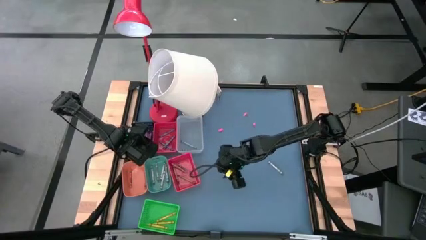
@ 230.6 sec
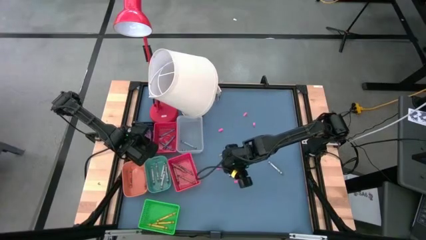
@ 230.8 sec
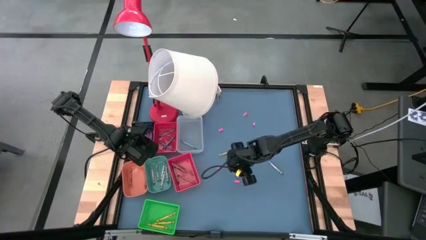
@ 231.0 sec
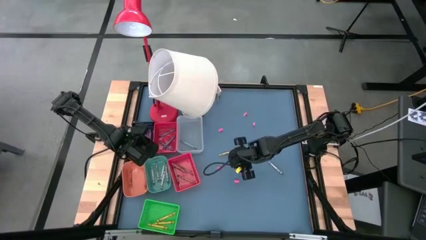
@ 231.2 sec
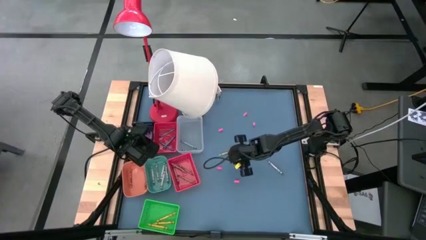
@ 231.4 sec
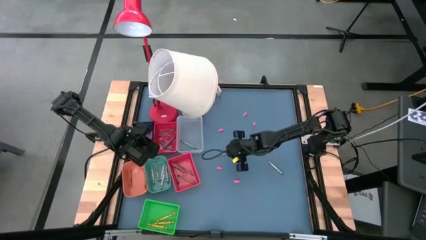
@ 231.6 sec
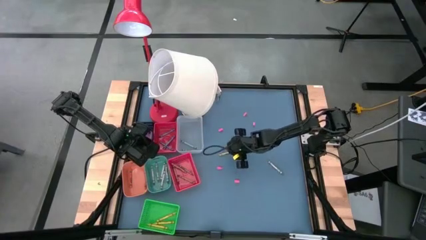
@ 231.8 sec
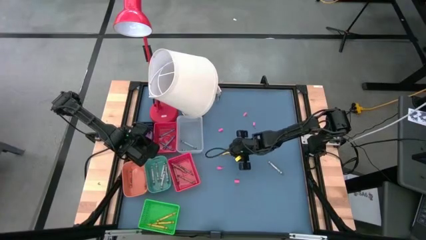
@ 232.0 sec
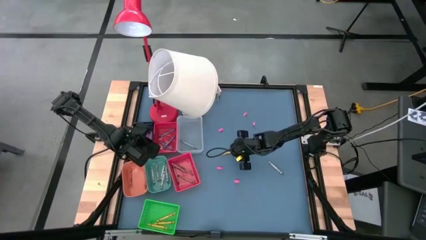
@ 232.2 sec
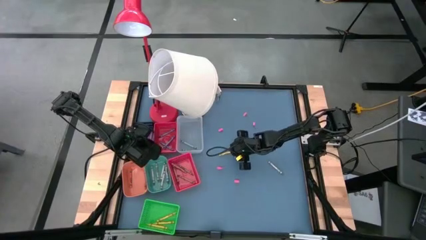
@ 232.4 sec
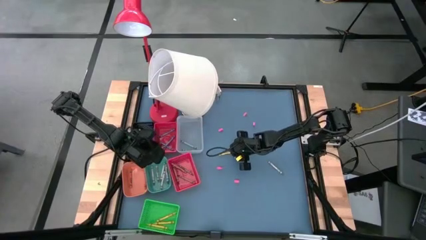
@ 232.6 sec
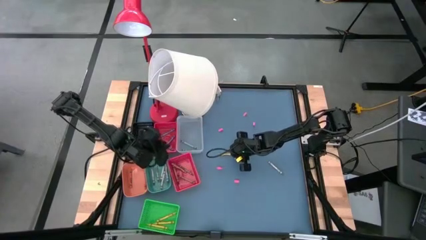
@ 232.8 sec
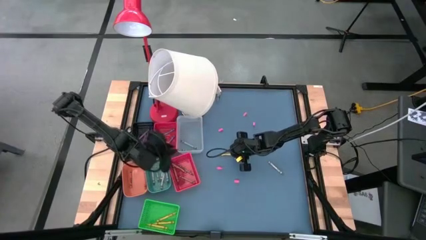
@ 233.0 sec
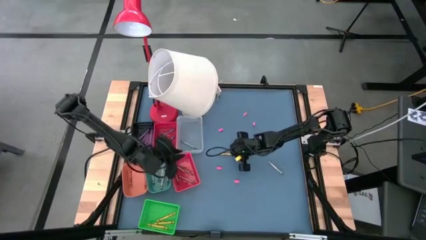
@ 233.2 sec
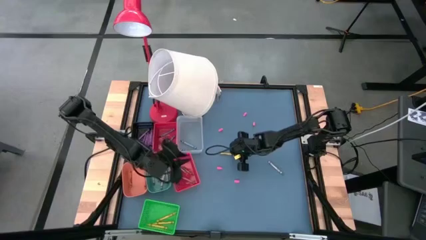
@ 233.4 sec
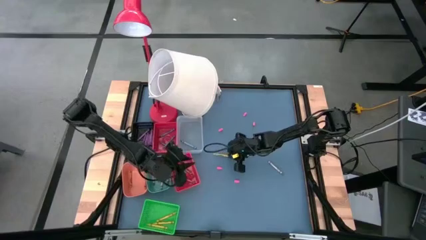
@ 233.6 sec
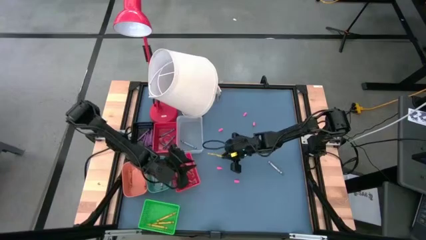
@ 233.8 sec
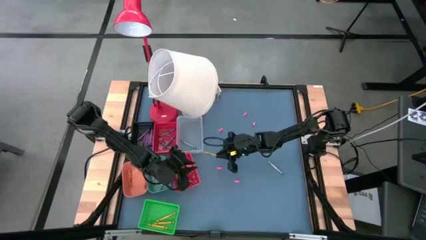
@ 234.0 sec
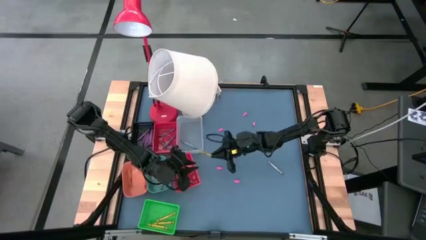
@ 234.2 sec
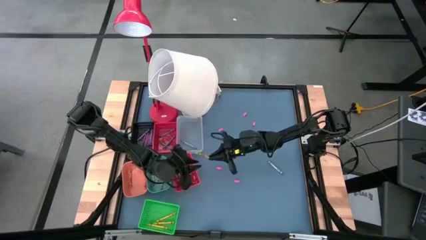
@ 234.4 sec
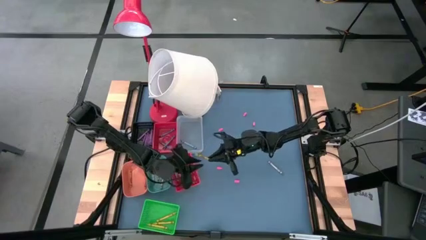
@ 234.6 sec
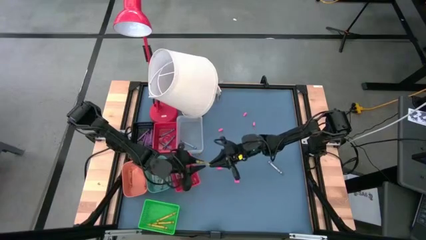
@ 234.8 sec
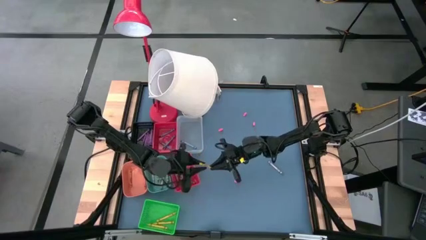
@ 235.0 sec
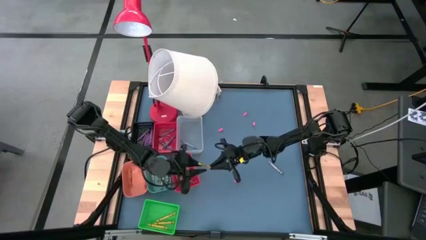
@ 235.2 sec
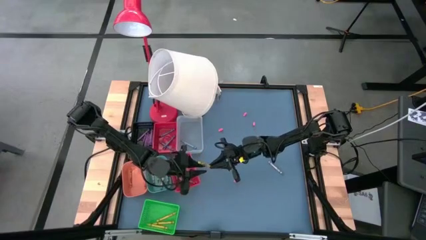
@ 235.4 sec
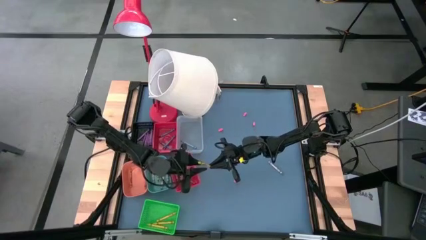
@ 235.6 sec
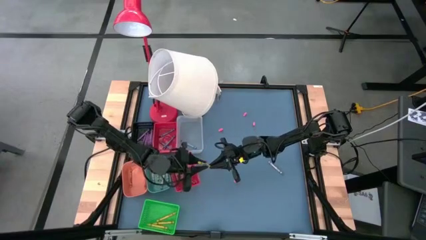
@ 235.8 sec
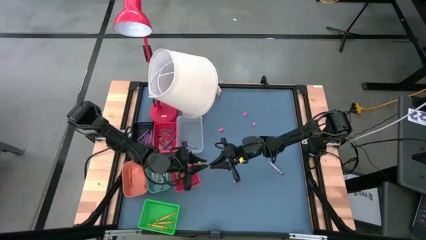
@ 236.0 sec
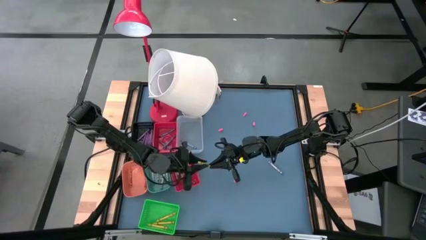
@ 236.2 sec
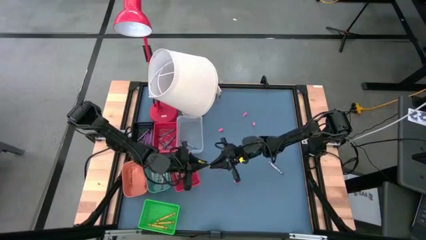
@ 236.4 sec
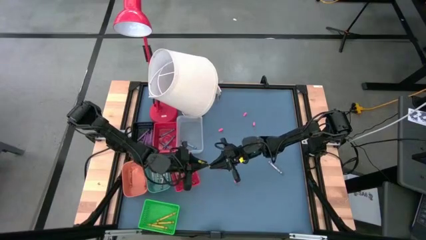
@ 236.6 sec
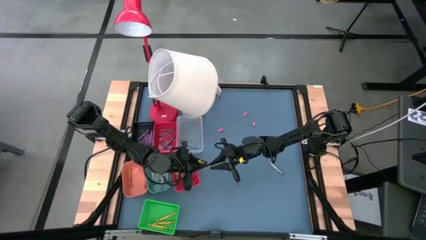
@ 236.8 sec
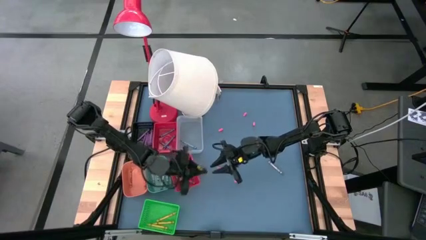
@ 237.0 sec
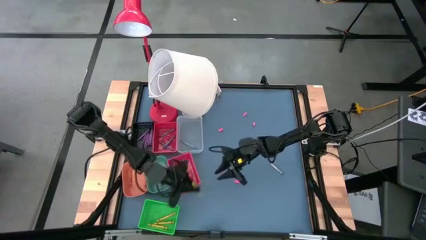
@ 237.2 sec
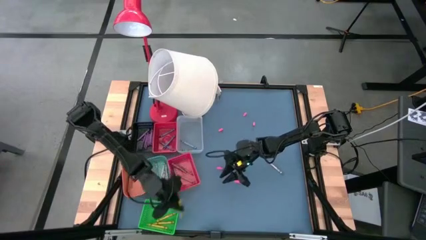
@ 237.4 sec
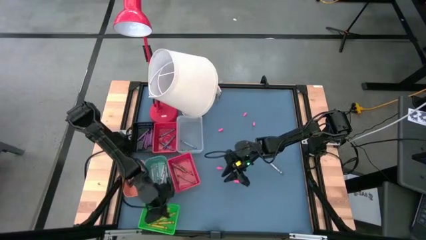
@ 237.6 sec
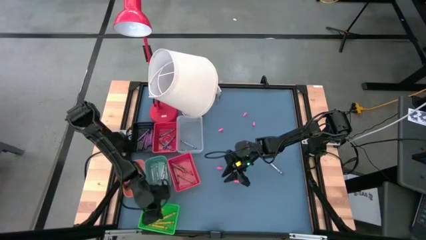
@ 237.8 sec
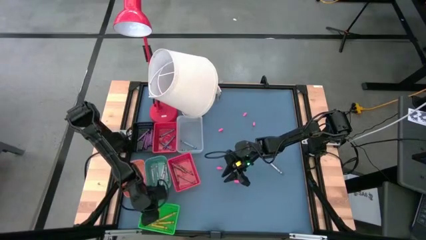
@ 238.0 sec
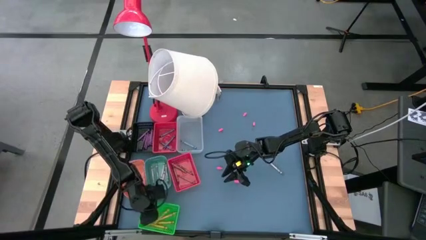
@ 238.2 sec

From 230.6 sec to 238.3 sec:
Task: Sort crayons
Put the yellow crayon into the green bin

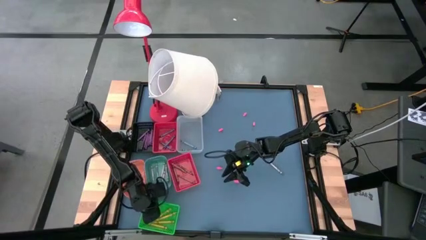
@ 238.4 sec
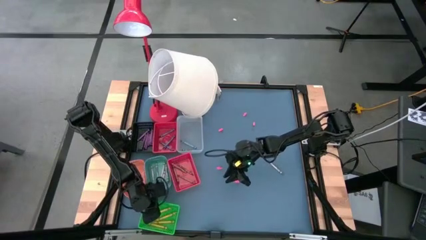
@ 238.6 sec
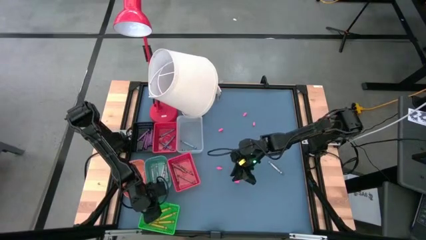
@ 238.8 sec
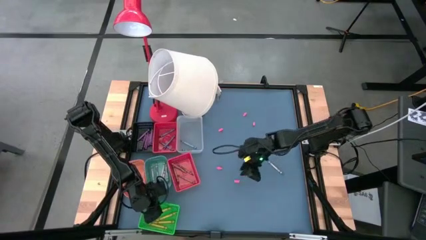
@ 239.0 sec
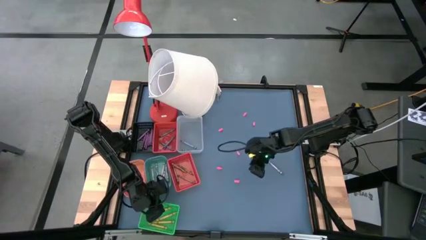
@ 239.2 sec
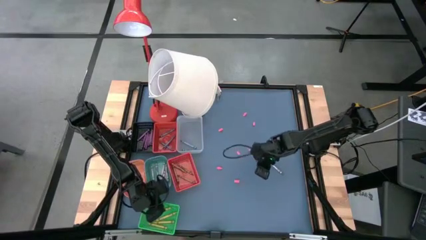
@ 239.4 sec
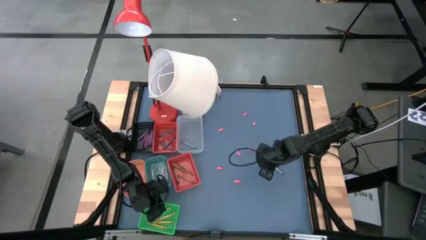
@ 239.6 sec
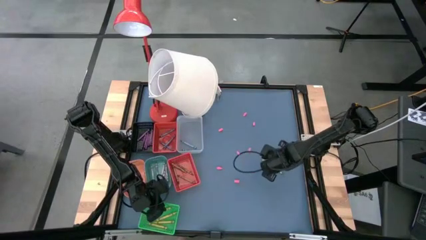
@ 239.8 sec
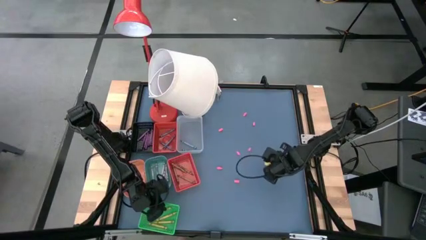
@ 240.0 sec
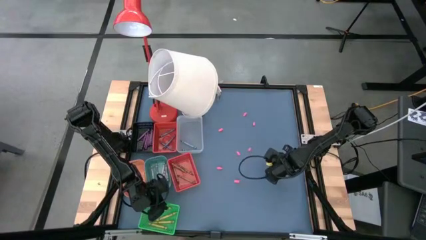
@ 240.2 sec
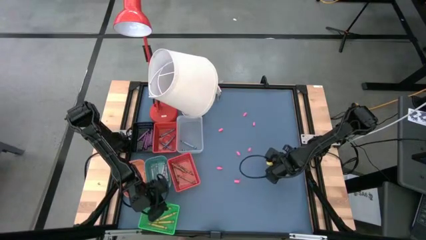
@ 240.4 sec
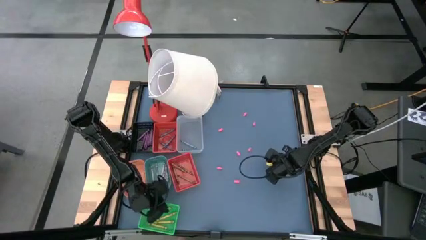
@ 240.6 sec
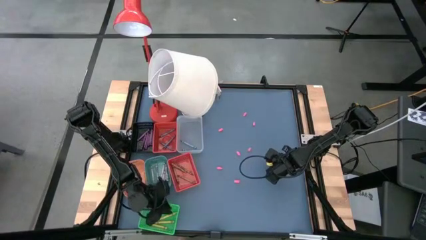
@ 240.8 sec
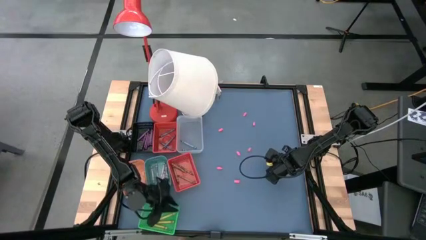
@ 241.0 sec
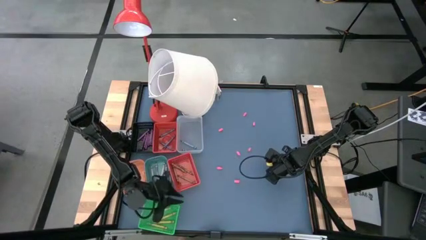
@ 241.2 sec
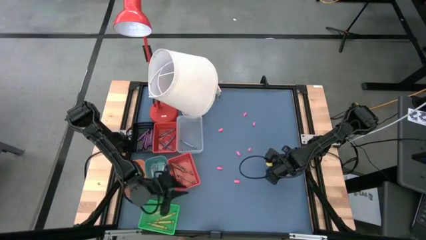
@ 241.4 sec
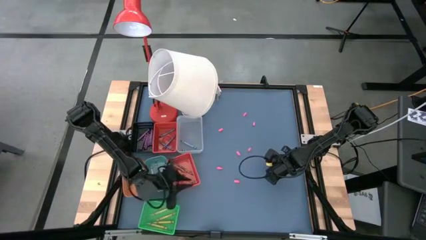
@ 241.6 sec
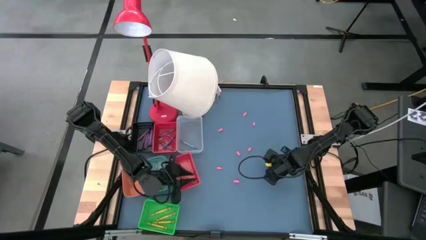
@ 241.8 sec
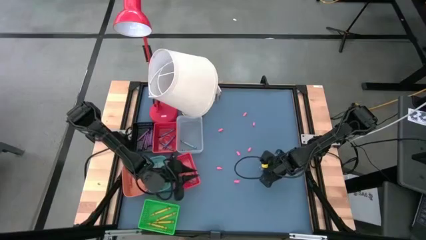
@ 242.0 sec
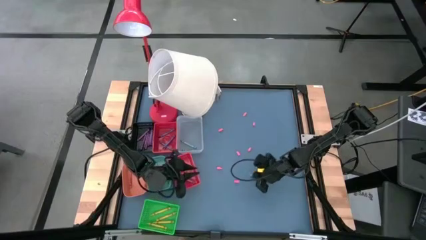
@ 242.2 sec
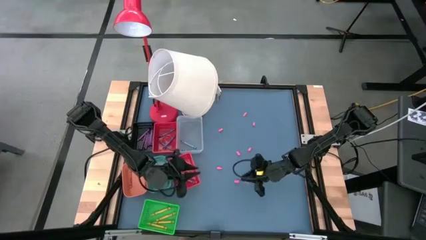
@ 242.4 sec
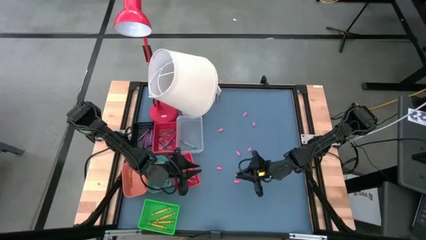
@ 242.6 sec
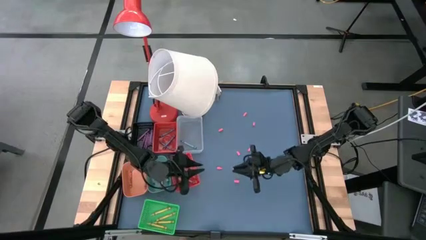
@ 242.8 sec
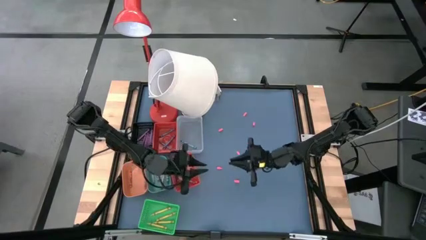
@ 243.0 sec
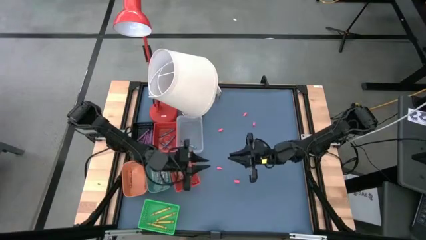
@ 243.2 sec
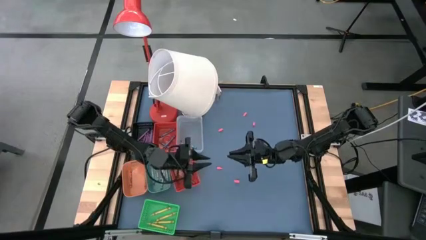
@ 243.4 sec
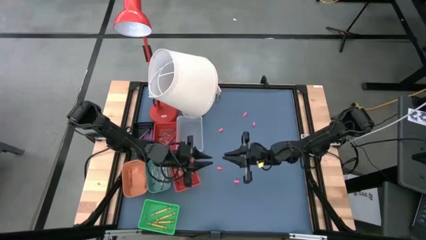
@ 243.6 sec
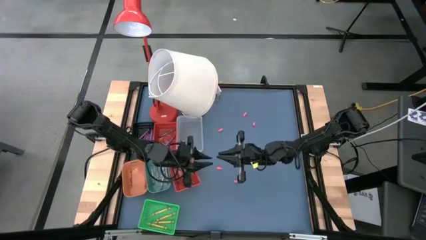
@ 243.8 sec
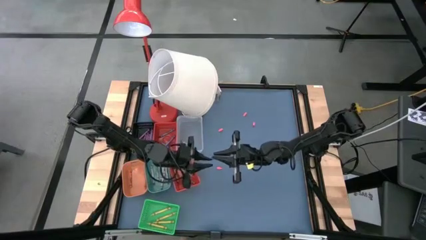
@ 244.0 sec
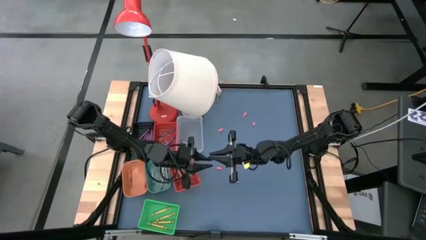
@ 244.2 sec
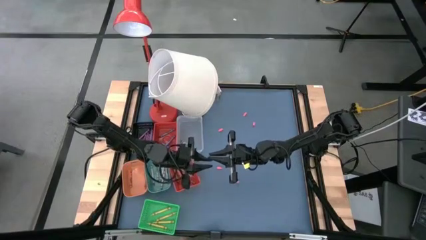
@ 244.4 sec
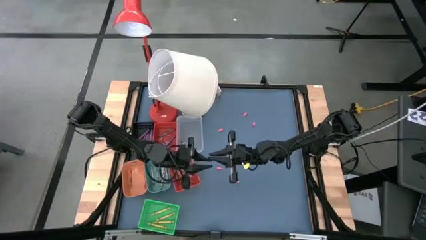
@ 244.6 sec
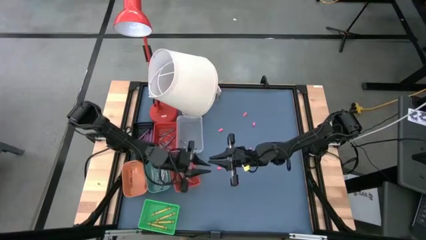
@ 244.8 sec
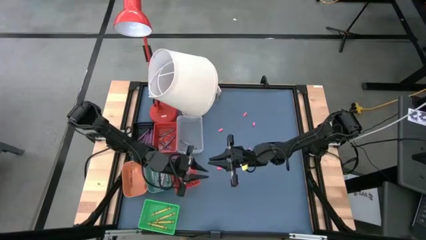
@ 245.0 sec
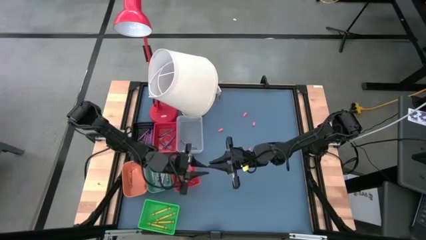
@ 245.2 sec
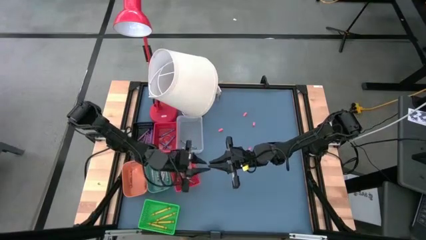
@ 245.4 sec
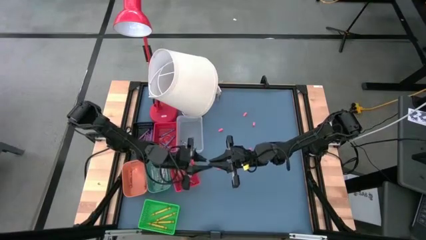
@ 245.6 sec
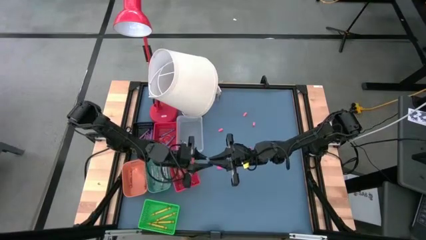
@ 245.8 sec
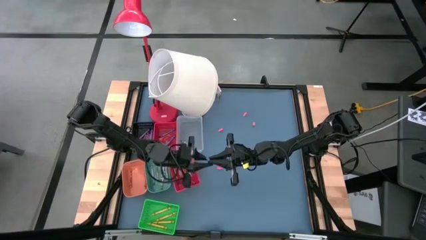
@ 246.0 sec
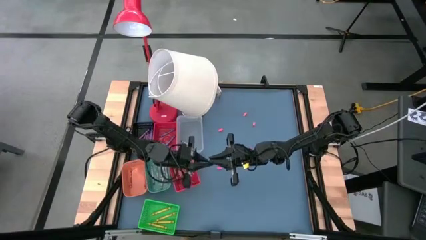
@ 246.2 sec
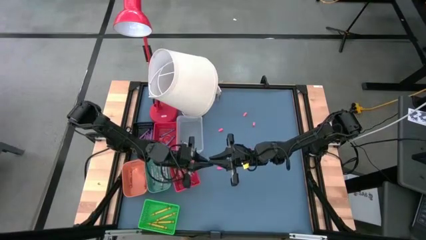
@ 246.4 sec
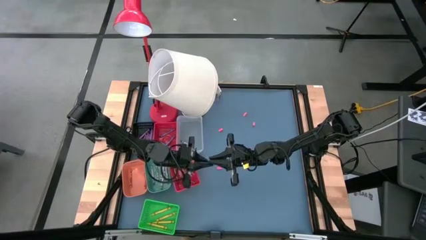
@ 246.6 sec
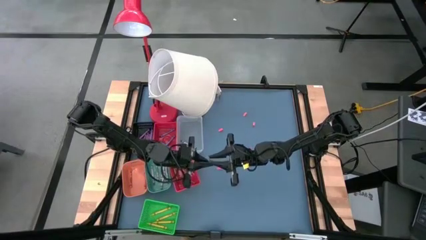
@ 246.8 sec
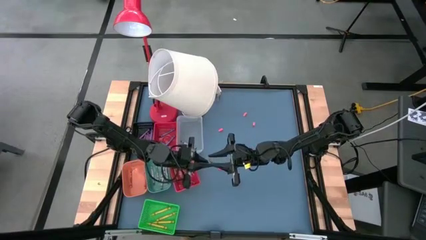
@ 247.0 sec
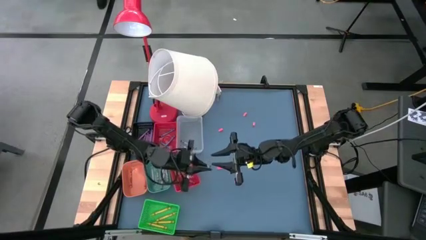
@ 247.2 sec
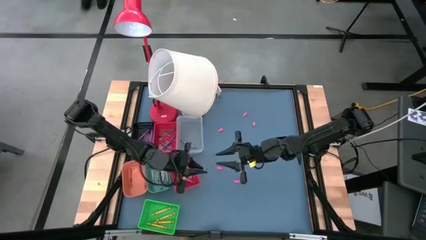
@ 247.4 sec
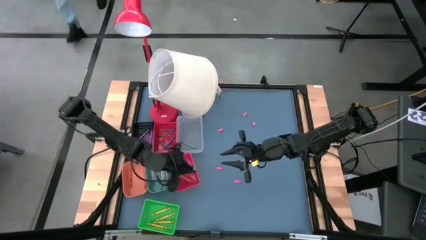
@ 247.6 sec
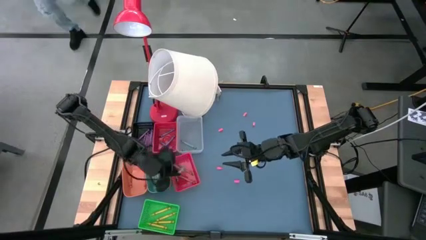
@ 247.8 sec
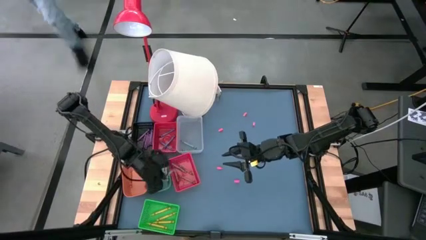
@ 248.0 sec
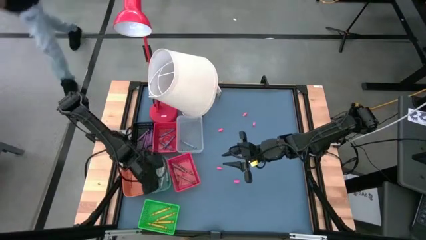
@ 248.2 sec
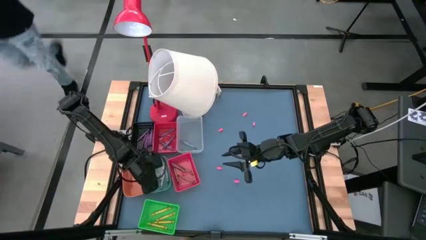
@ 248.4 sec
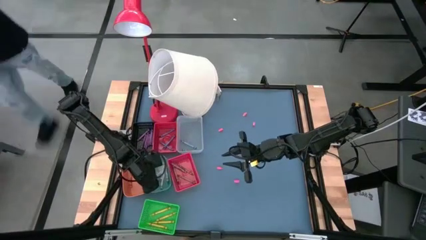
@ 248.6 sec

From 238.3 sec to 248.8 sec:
Put the gray crayon into the green bin
